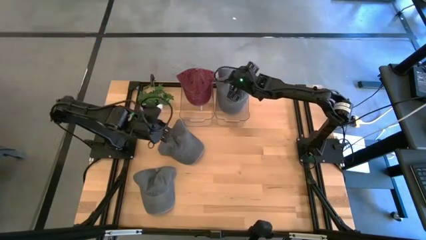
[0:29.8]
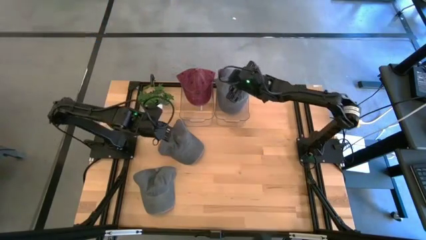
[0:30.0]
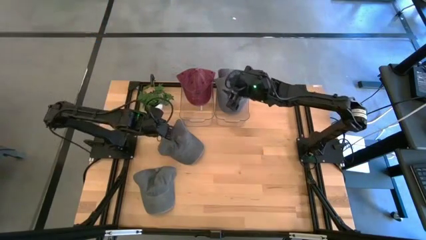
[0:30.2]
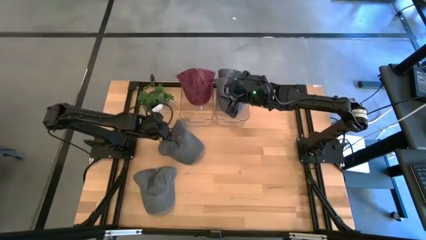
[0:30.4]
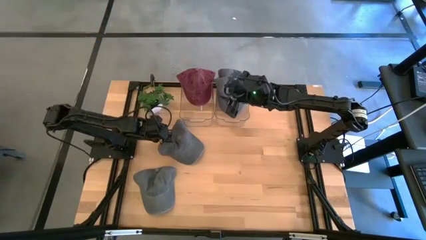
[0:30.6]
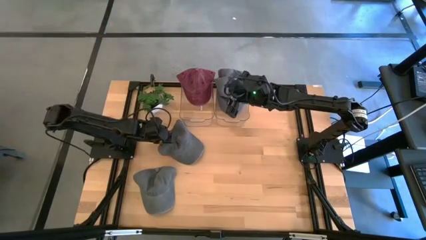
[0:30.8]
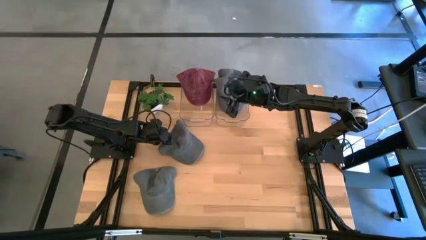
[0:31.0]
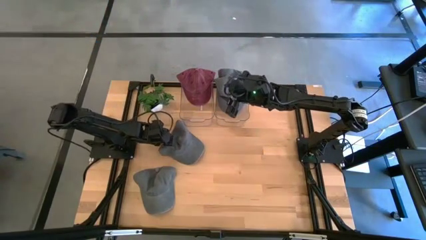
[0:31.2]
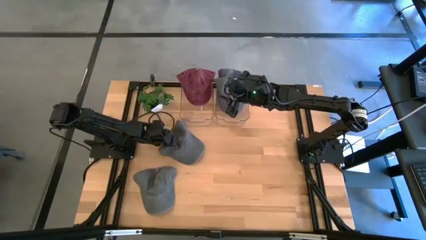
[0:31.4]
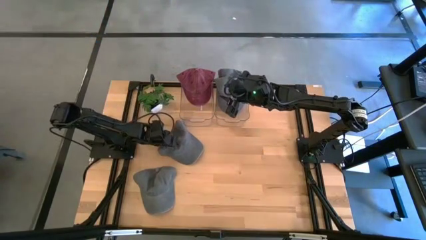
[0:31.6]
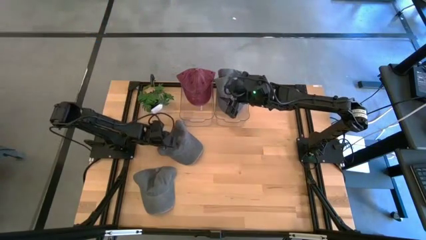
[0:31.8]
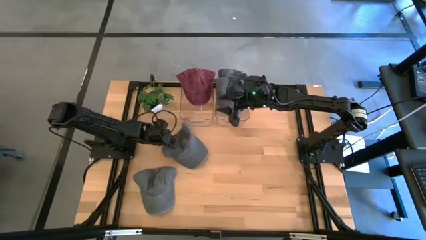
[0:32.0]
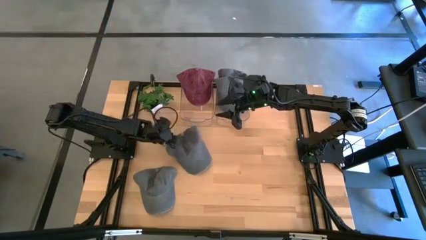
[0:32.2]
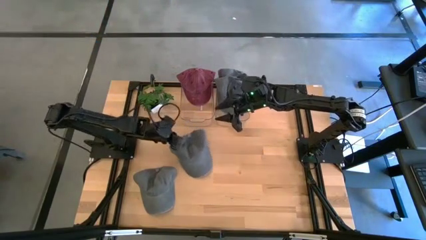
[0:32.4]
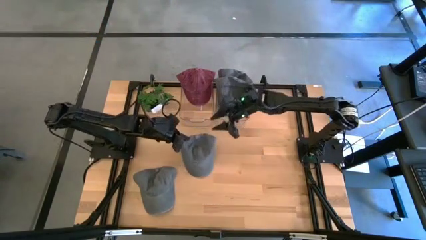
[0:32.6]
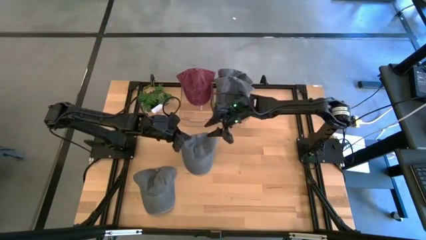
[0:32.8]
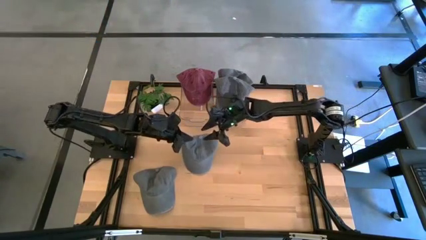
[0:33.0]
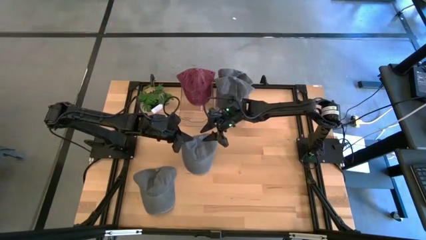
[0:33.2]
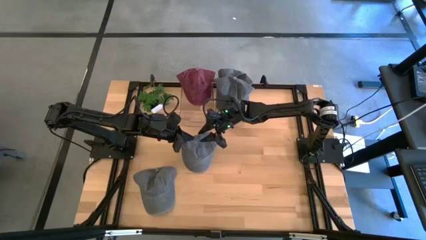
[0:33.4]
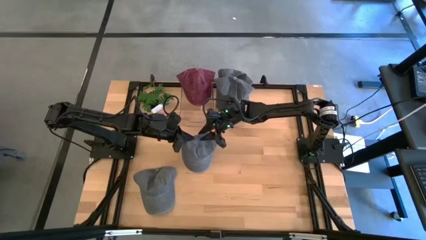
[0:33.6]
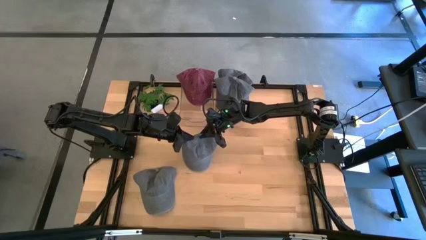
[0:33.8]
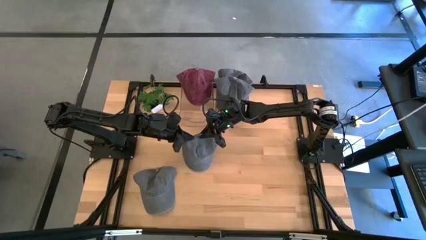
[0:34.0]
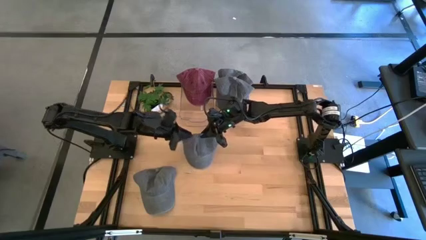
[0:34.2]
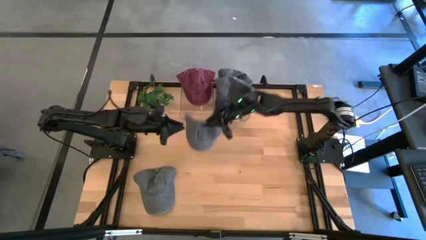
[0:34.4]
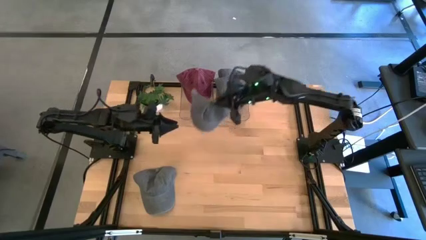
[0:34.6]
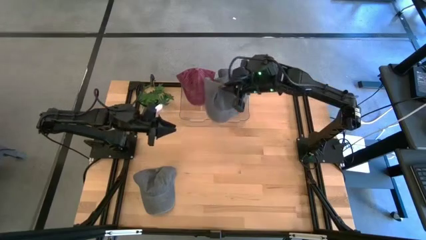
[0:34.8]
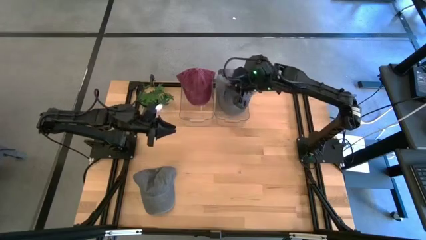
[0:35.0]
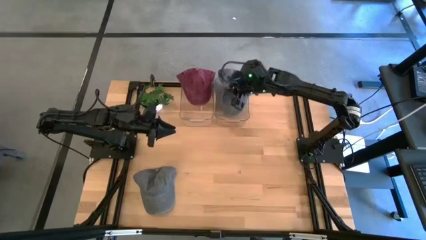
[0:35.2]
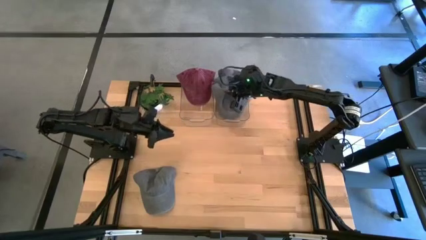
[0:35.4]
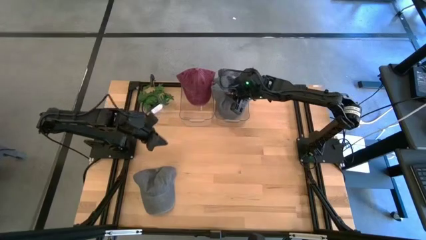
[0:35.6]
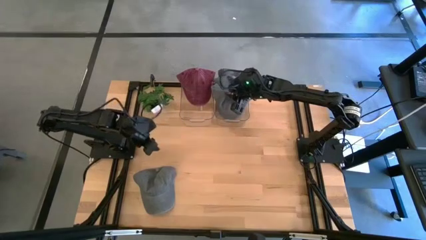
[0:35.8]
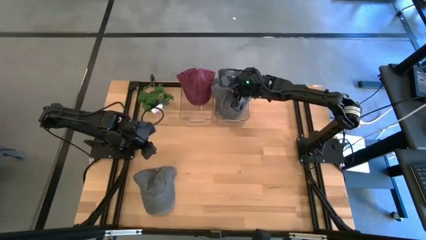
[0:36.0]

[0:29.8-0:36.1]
Task: Pick & Place hat
Put the gray cap into the right transparent bin

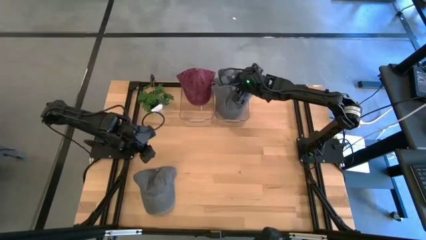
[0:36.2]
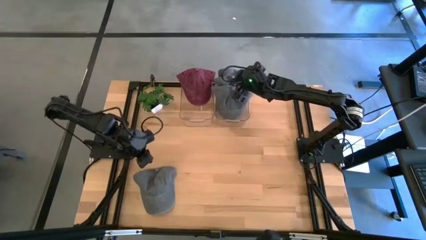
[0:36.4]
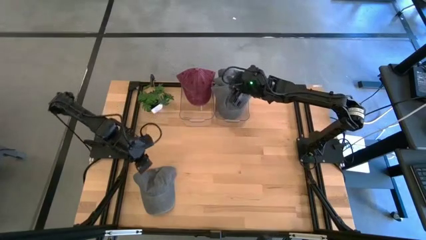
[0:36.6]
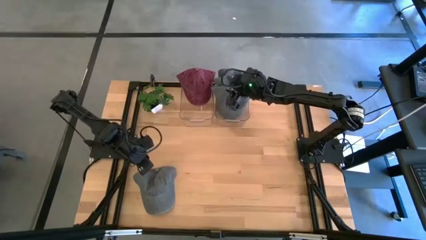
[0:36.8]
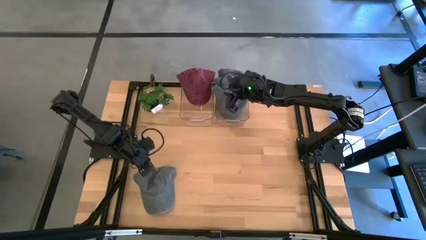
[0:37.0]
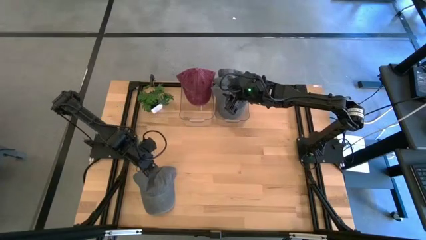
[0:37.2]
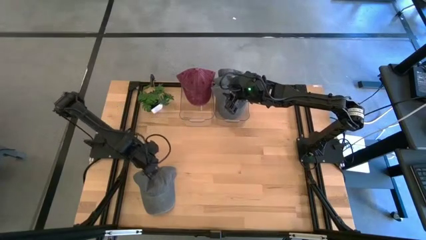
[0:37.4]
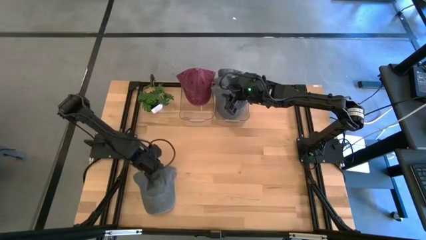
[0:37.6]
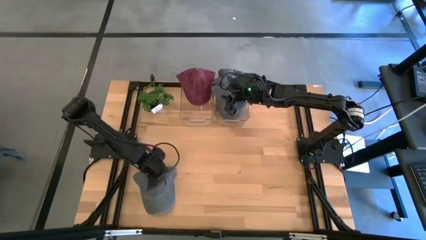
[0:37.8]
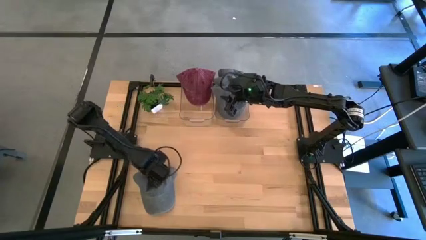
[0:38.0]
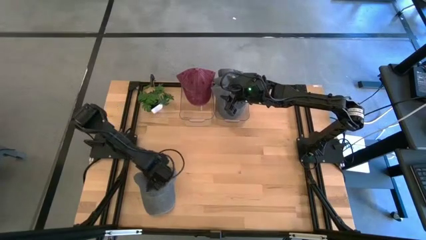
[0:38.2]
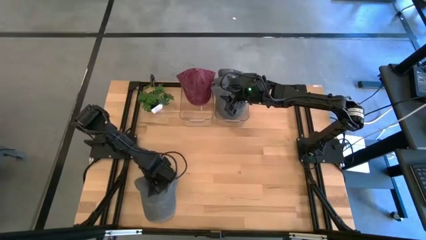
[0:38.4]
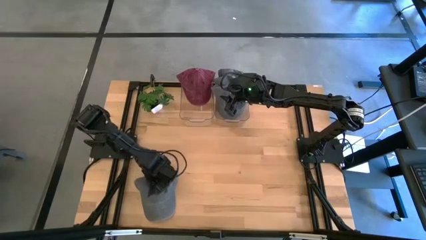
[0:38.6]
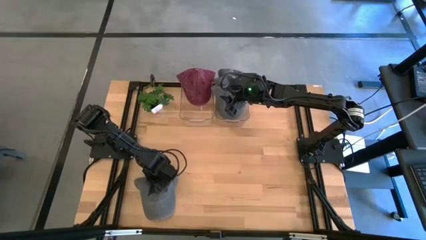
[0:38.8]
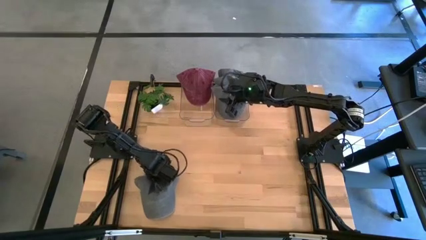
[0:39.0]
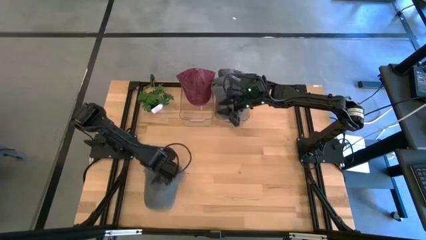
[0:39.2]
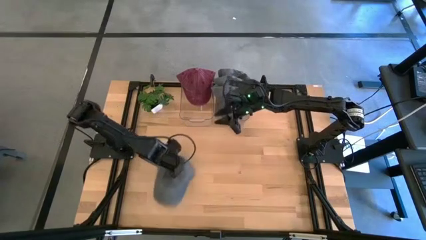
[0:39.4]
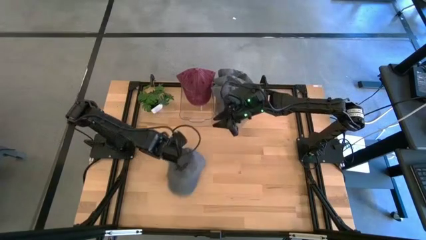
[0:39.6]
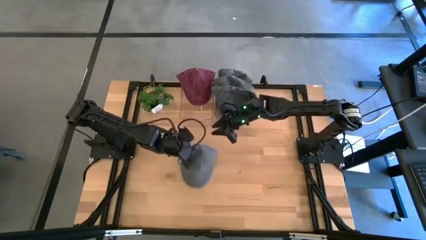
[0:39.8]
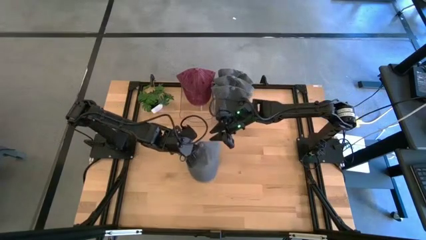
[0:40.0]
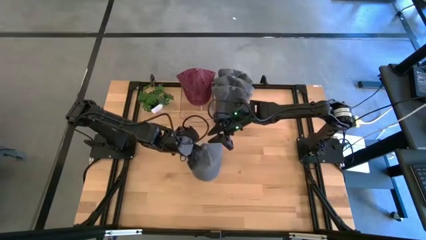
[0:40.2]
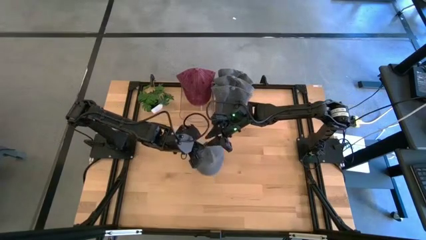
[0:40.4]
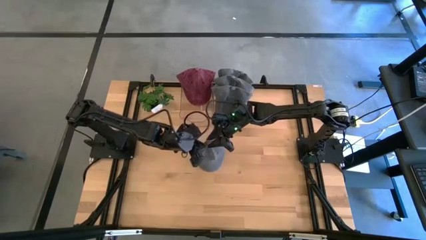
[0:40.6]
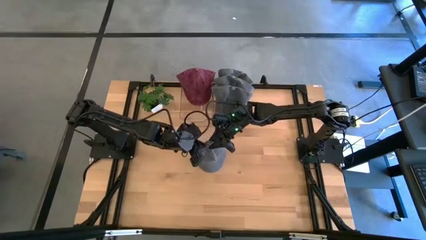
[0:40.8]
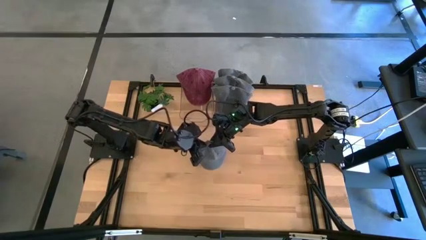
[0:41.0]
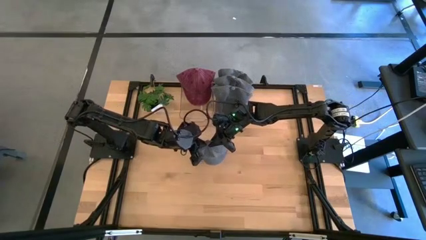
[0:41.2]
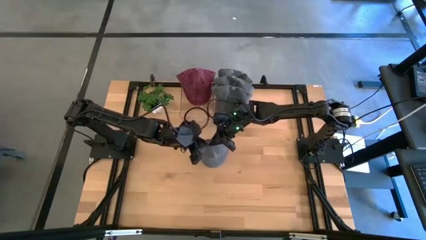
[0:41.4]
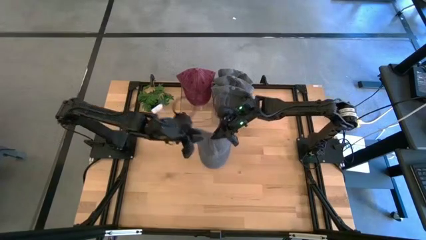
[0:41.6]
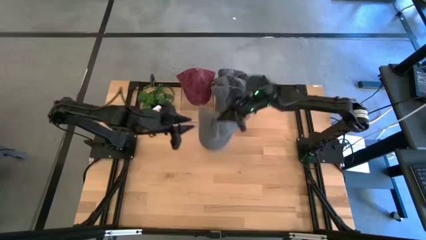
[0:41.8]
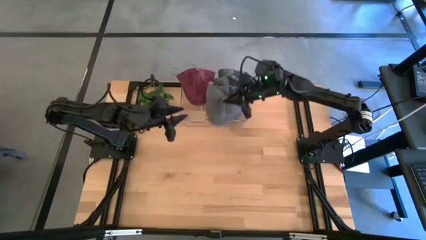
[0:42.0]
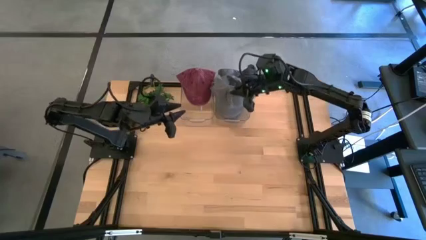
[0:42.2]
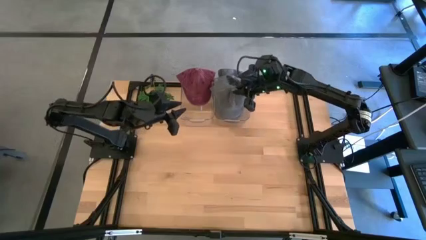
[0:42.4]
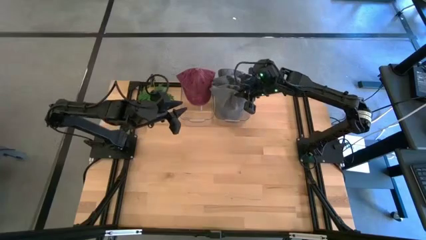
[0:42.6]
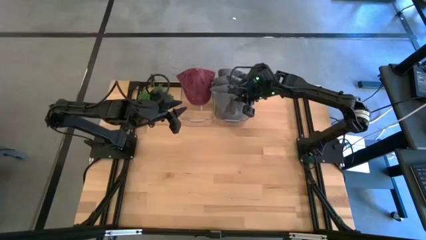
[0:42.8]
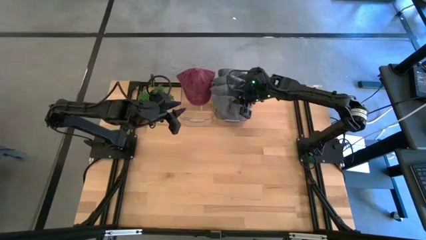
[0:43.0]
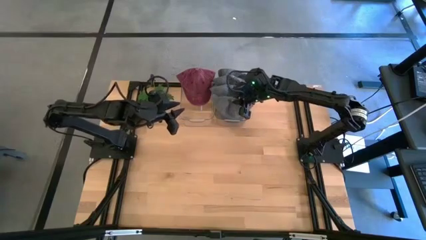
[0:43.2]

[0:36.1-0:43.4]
Put the gray cap into the right transparent bin

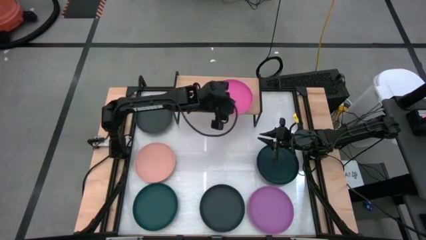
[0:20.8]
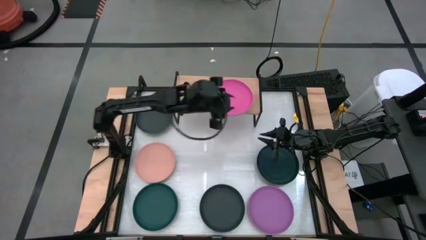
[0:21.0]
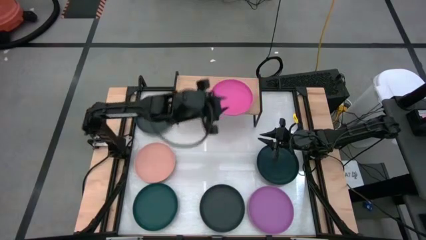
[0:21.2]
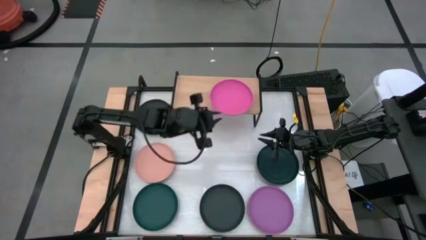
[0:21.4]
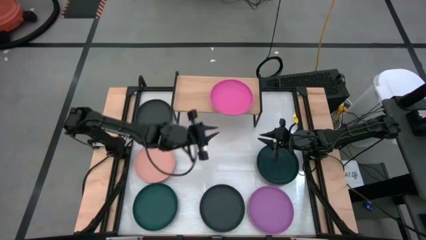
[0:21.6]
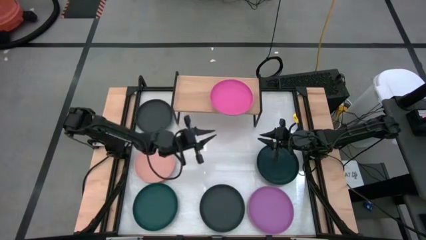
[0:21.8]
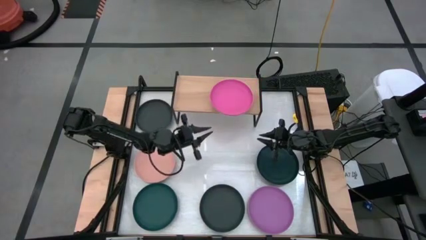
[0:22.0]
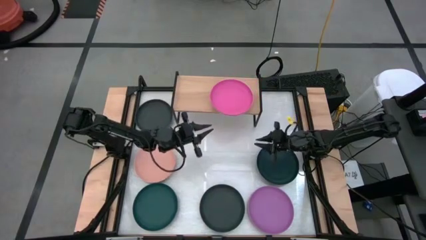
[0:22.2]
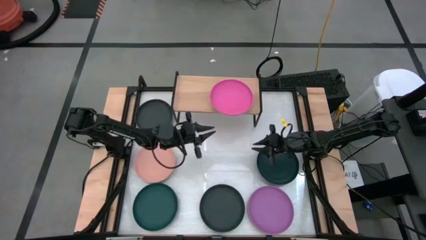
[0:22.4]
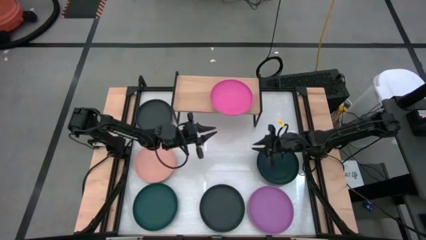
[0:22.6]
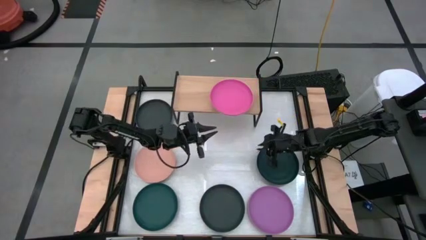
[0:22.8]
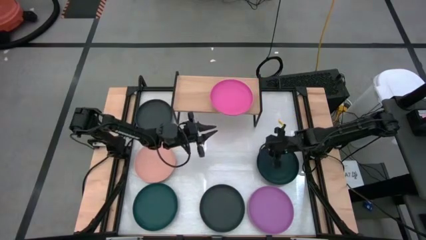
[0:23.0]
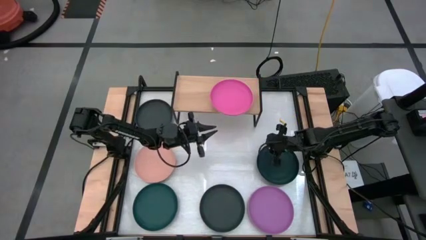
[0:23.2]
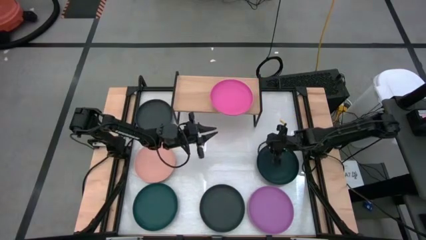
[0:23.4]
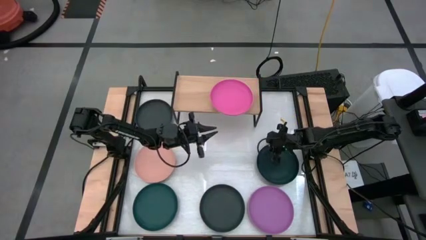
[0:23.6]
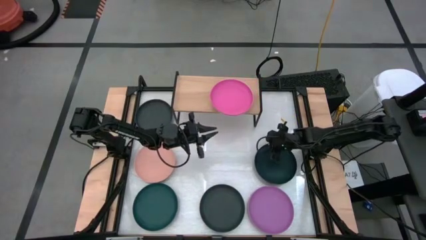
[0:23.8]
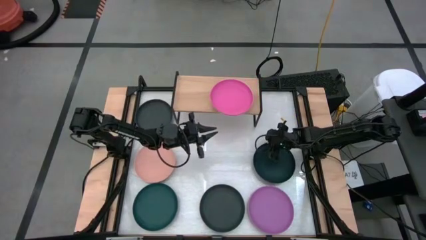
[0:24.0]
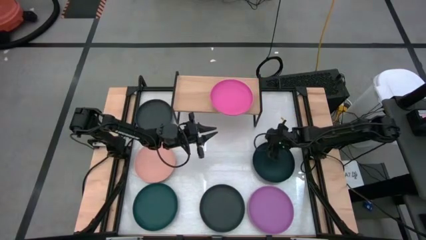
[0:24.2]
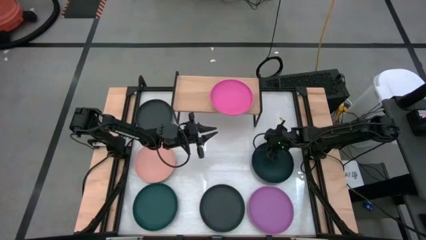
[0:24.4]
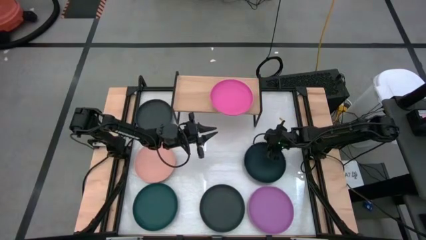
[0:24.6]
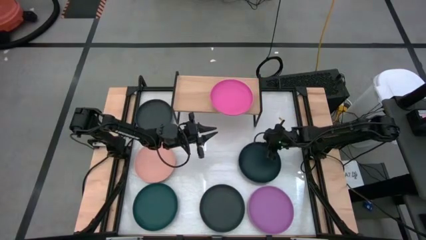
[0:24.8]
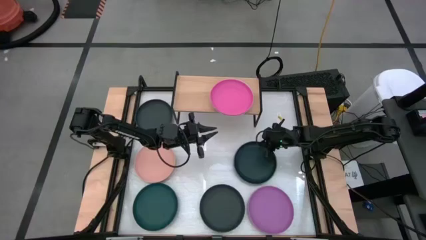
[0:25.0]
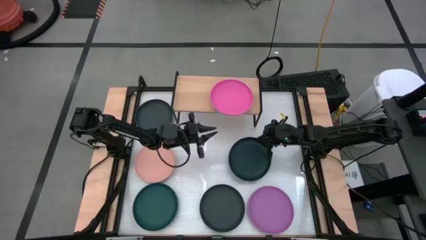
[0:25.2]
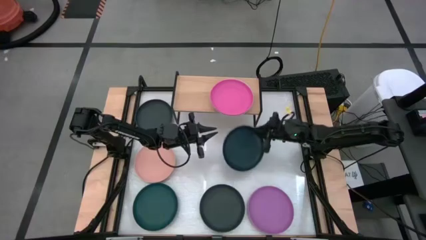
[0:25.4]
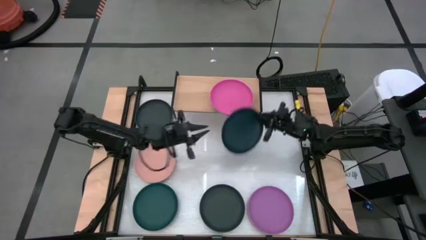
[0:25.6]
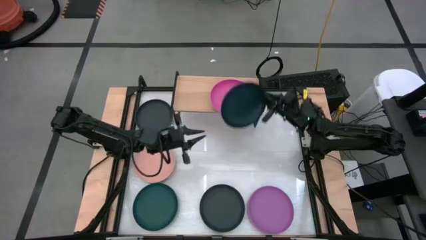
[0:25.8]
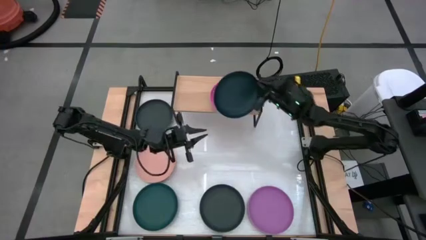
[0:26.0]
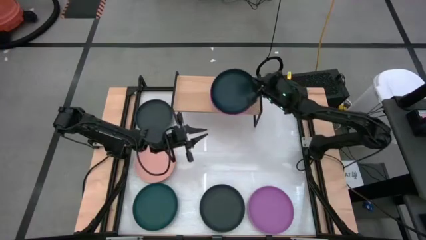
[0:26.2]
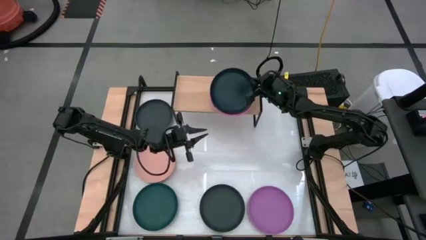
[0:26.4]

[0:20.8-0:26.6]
Task: Place and stack plates onto a shelf
Stack the right dark green plate o top of the pink plate on the shelf
